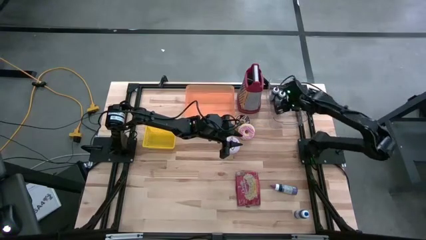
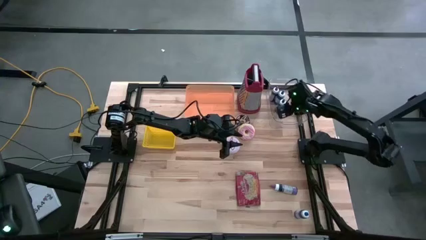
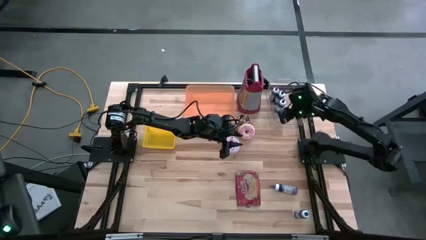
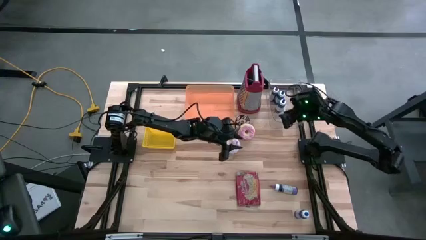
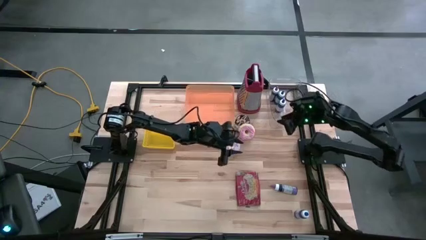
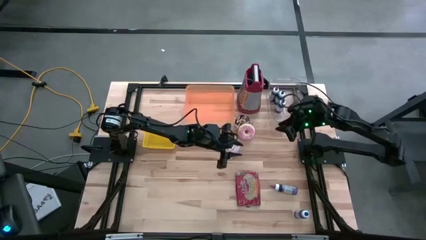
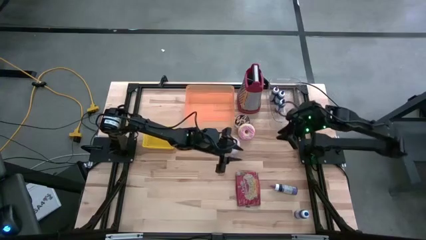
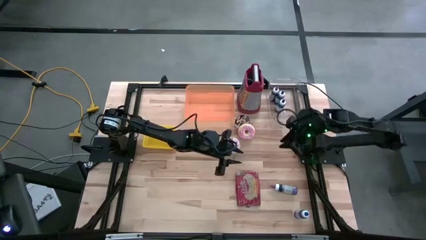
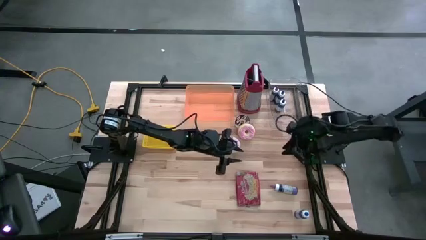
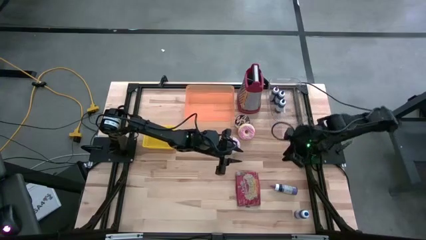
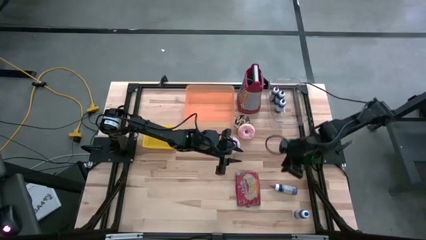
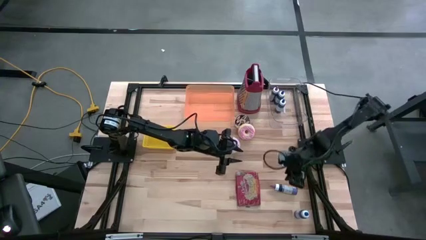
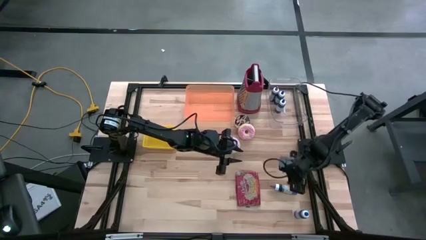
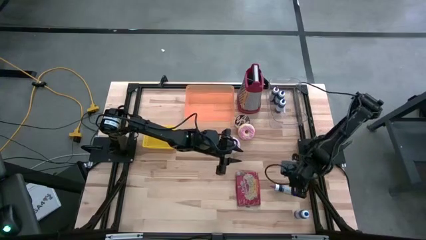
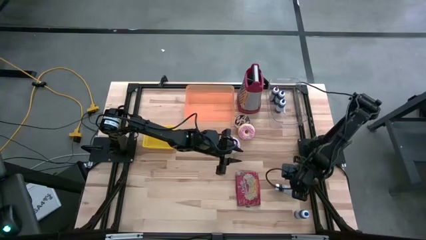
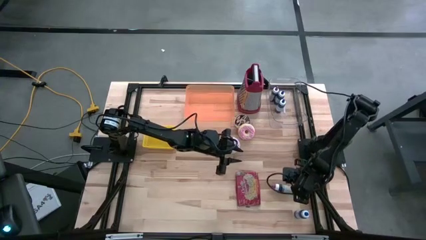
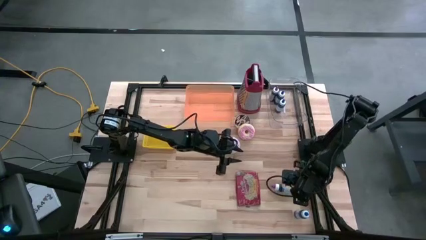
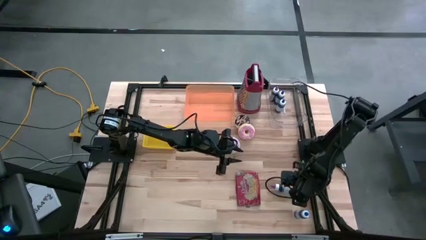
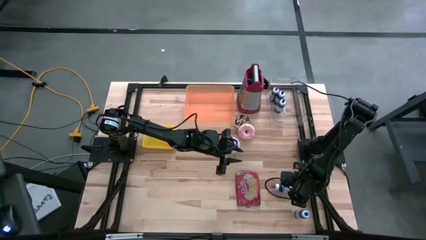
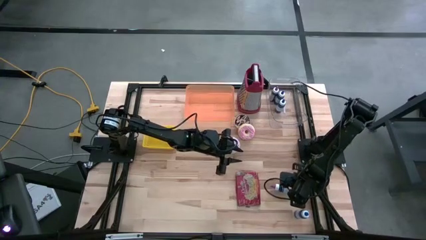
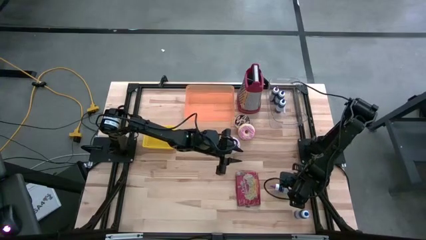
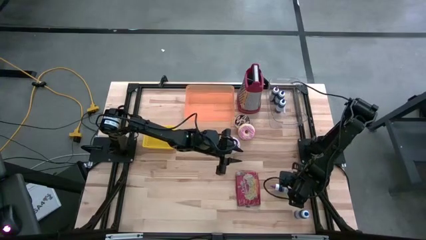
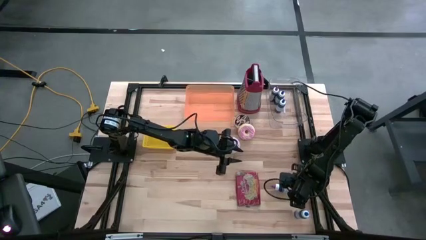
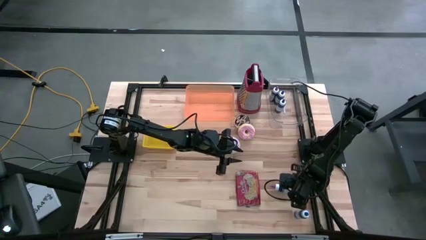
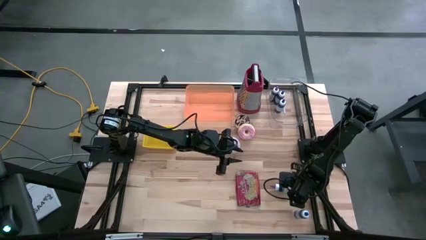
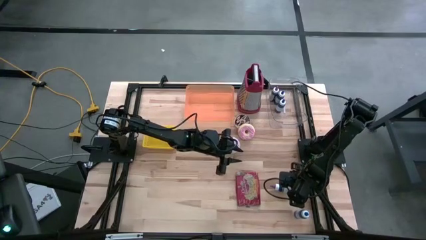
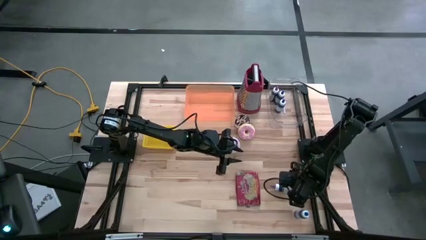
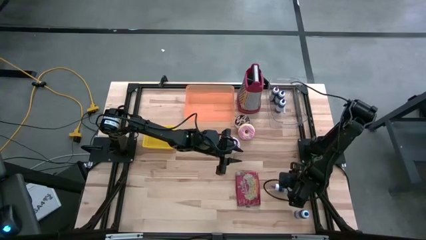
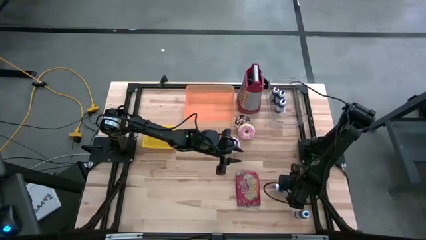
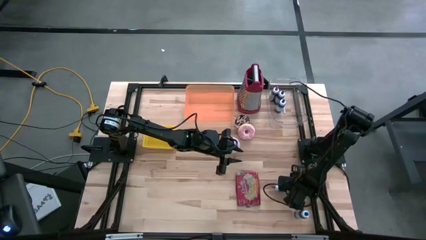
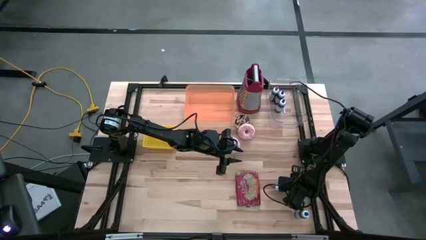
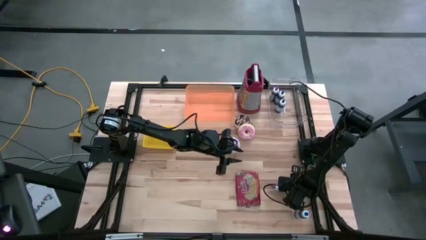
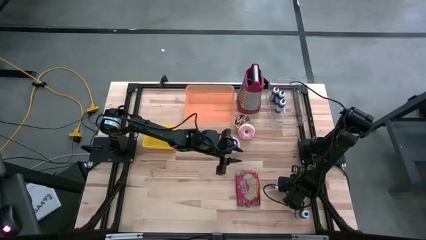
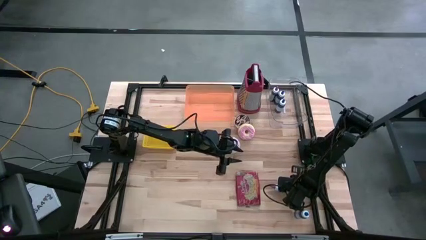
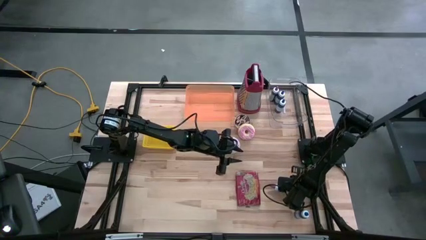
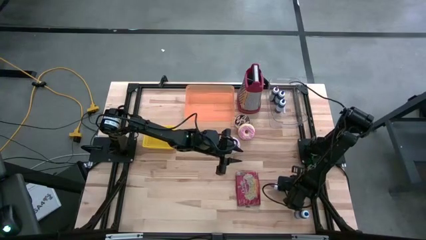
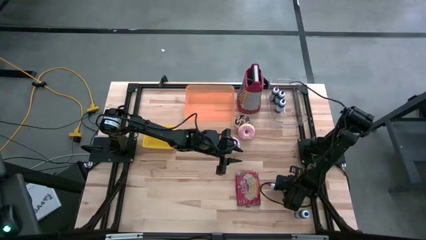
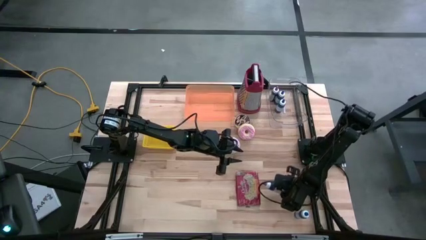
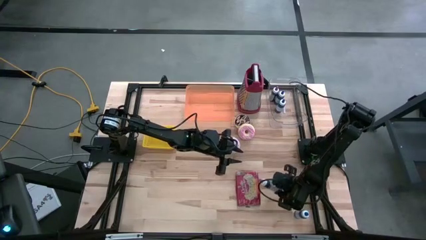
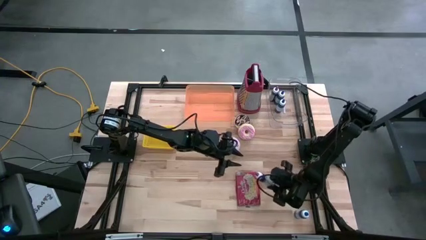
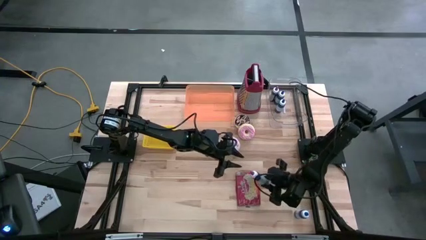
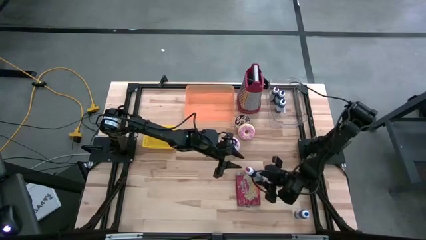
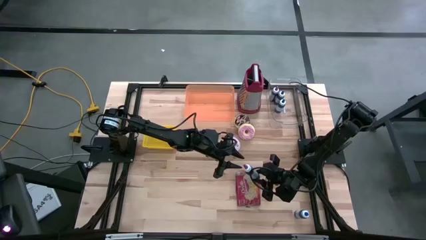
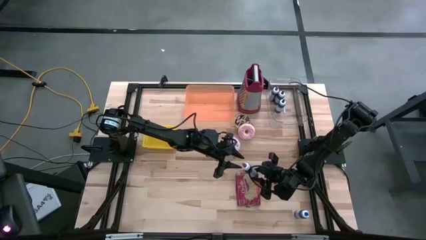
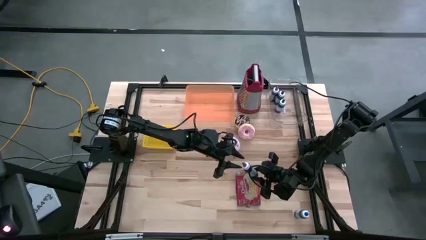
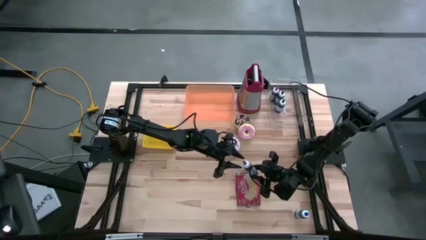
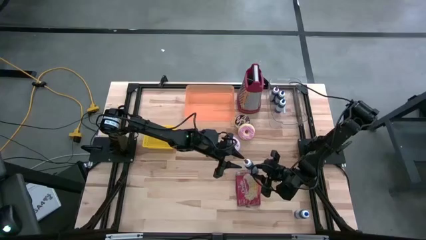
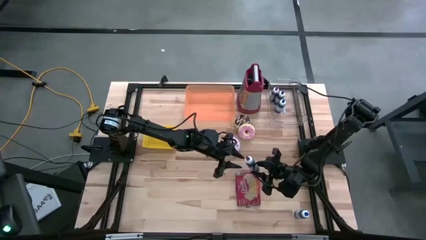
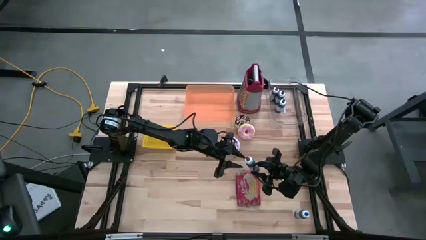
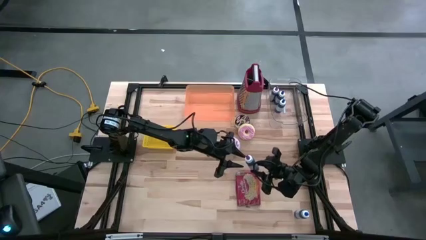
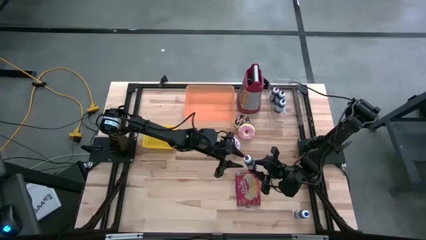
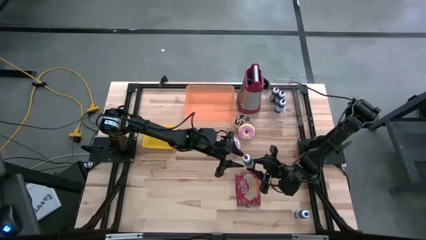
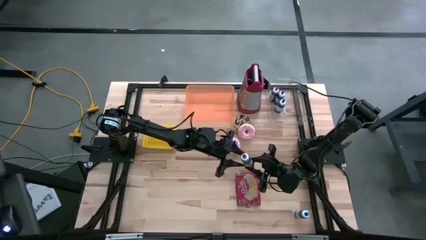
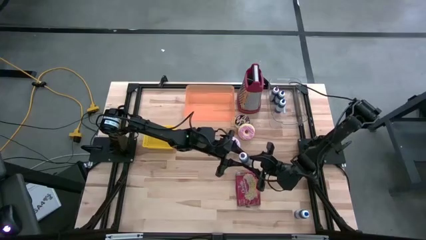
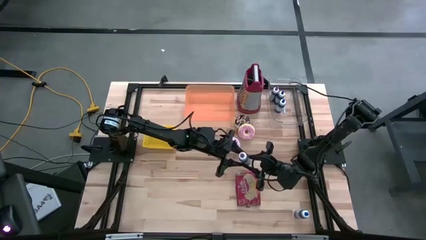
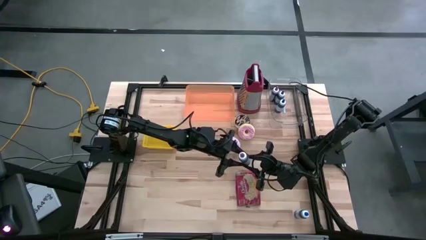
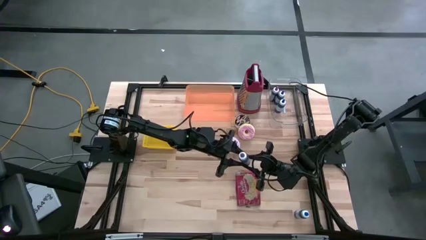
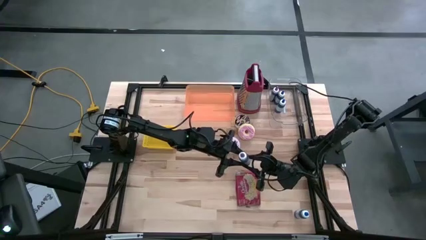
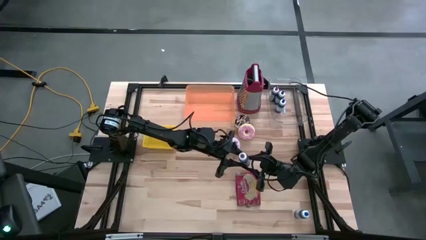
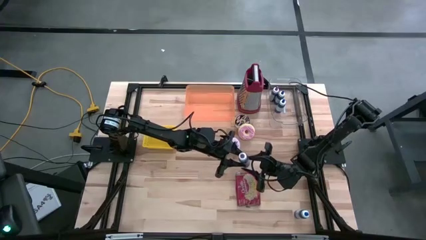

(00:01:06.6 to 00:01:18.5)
Task: Pick & Place Food Item
Put the violet food coloring bottle into the transparent bin

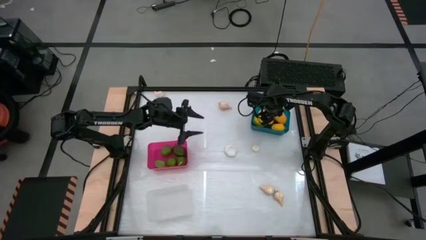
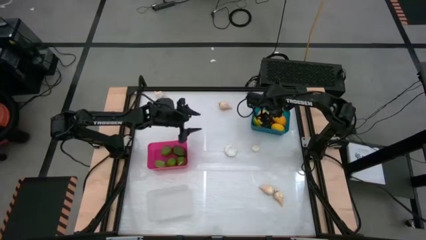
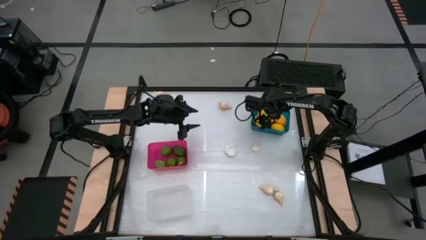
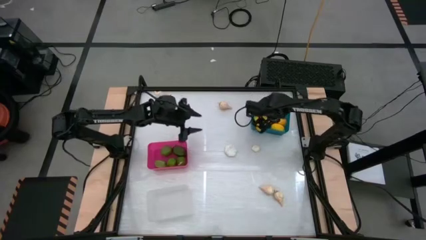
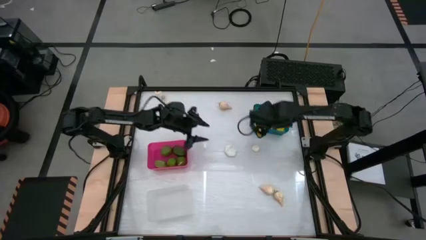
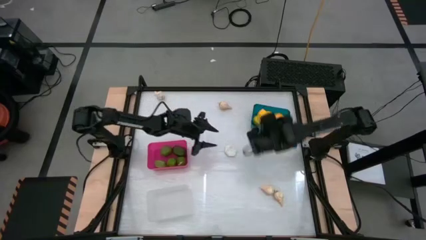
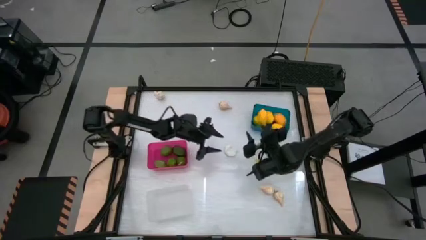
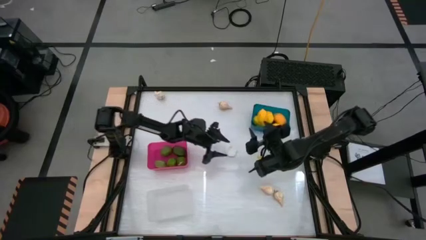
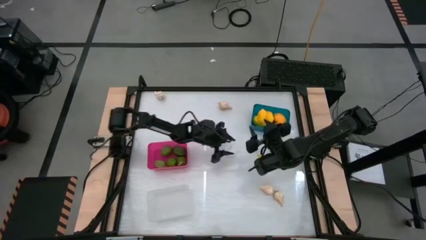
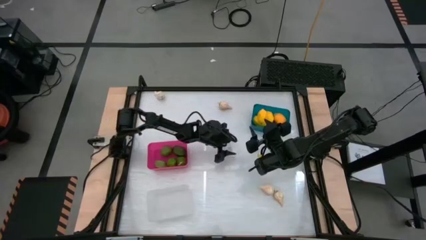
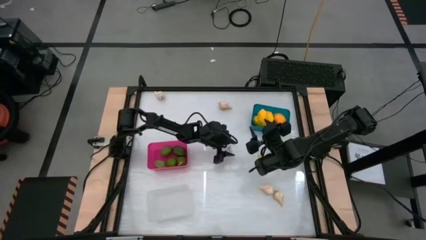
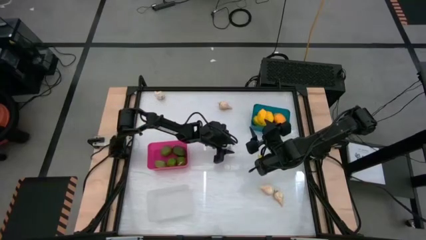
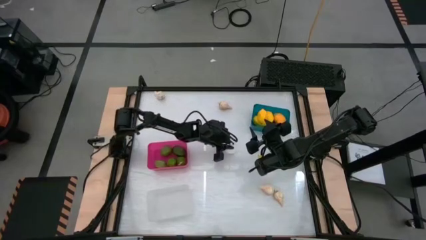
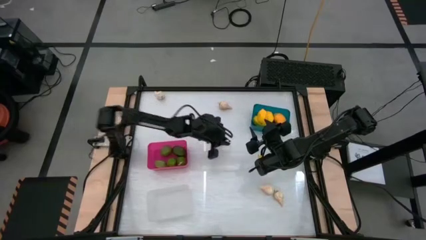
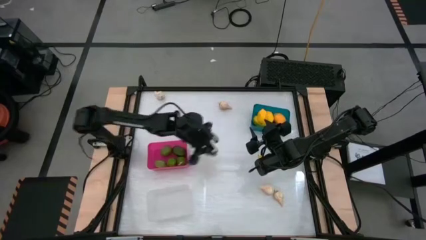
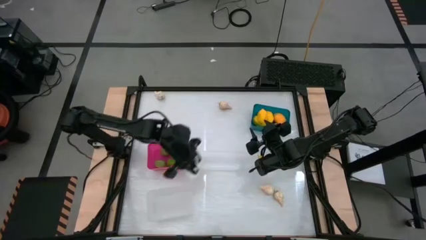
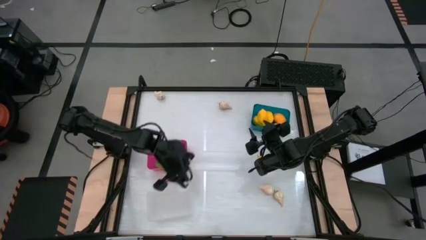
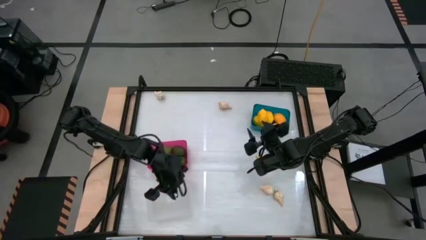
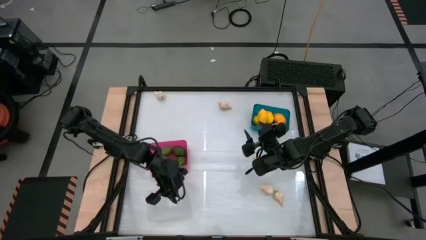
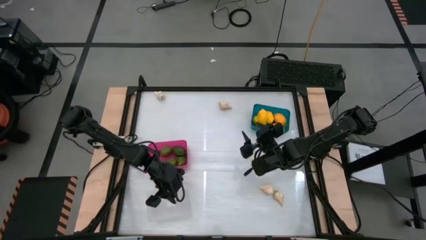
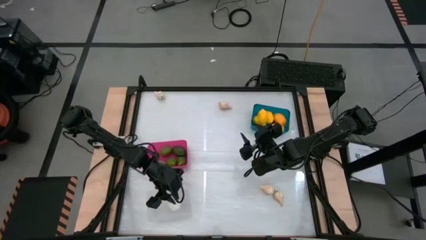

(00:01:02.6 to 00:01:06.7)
Task: Sort produce into baskets
Put the garlic into the white bin

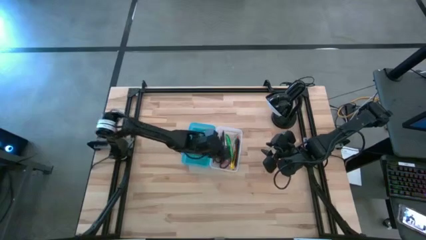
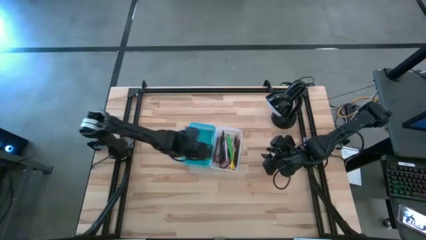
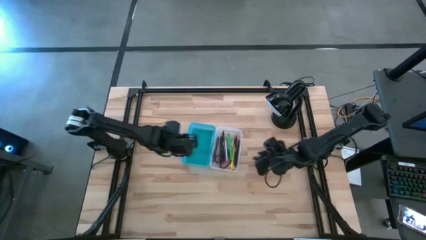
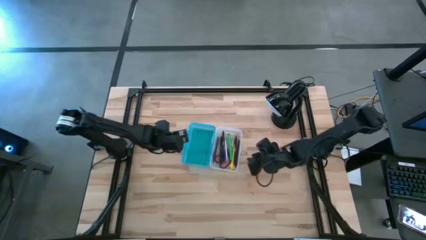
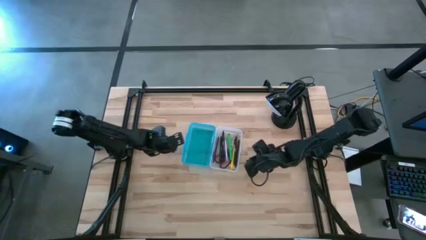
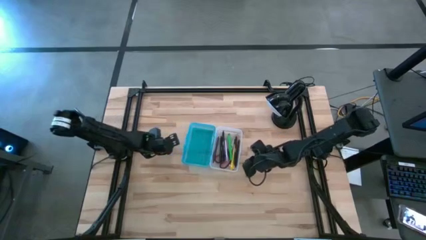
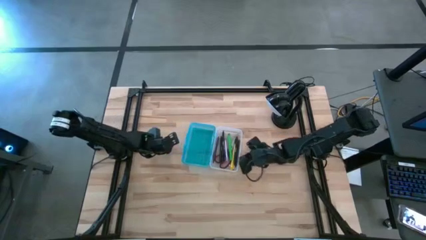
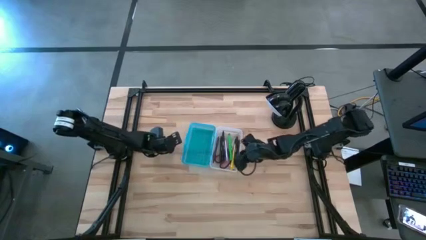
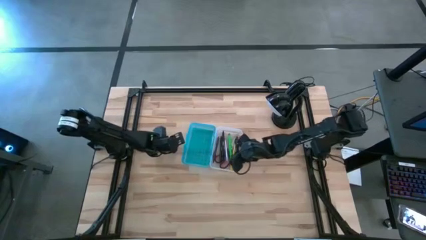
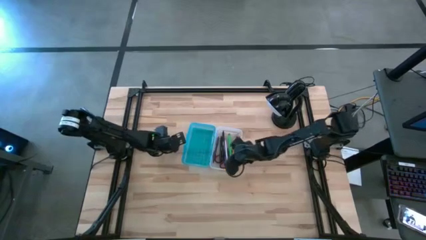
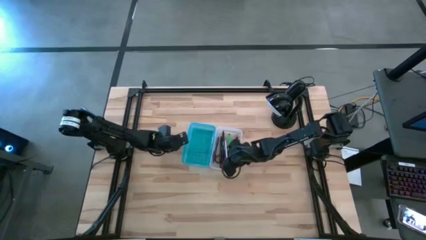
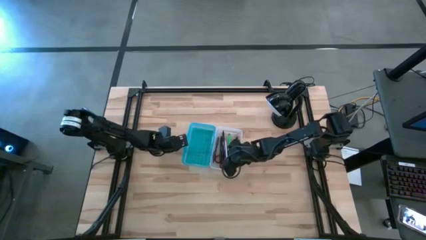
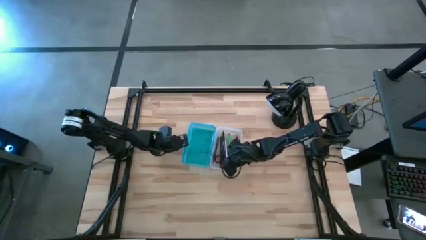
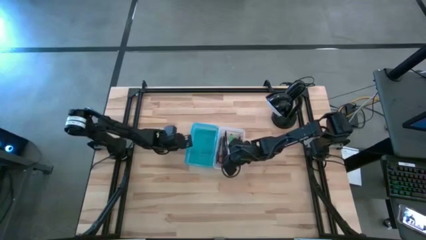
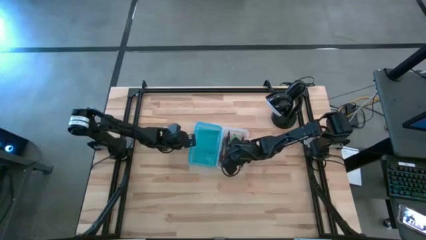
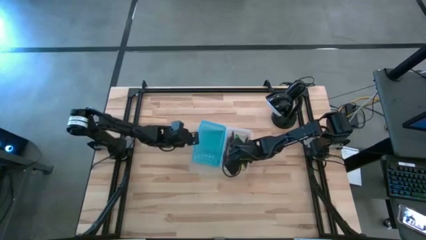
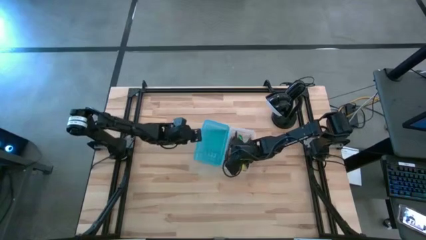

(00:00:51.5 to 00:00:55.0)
Task: Pick & place school supplies into a supply box
Close the supply box
